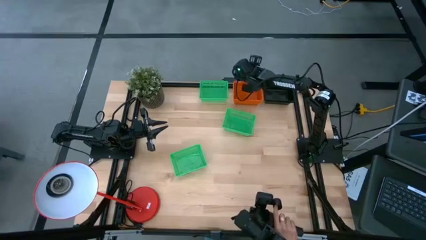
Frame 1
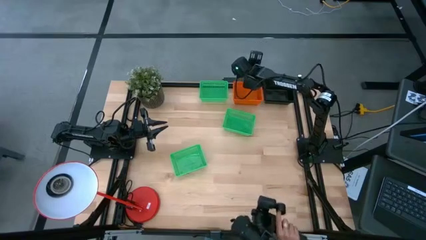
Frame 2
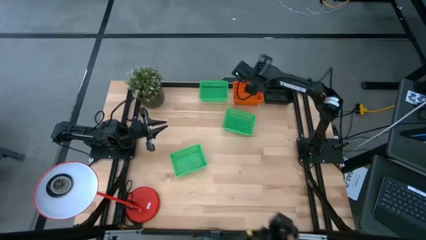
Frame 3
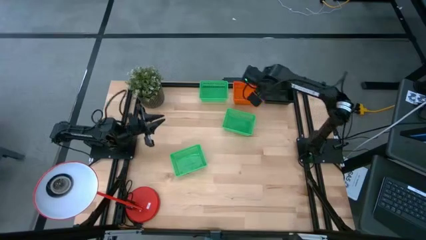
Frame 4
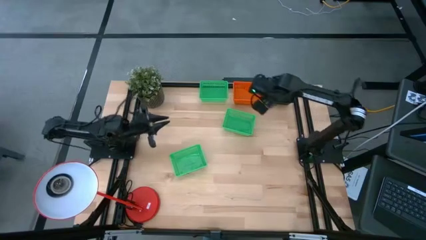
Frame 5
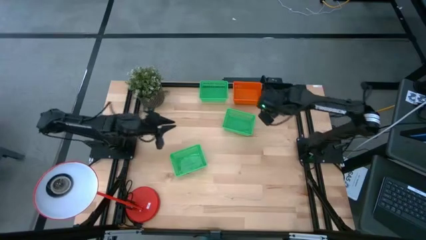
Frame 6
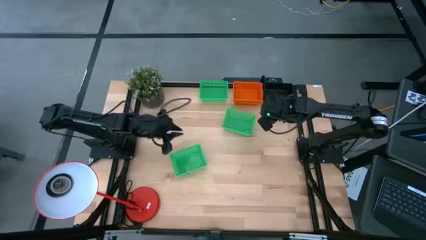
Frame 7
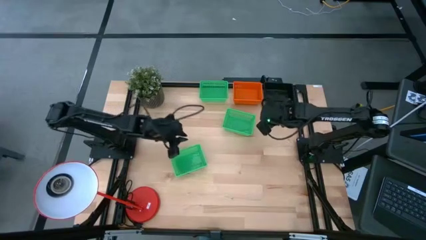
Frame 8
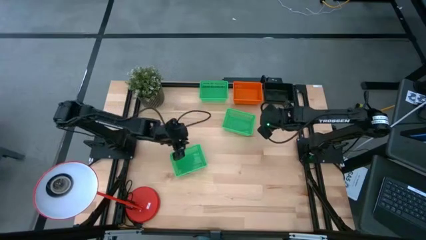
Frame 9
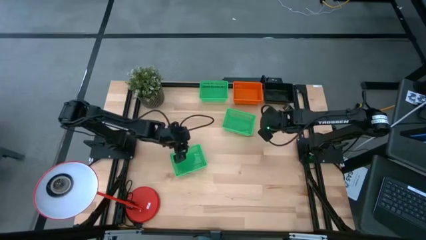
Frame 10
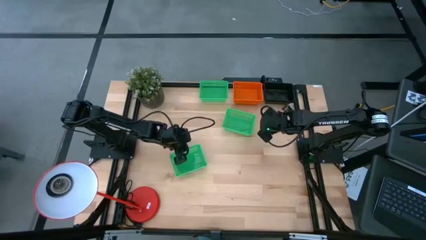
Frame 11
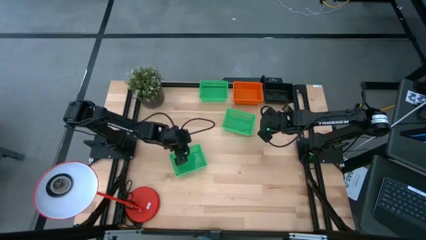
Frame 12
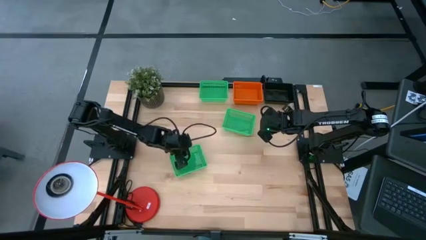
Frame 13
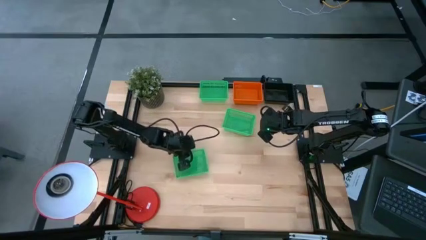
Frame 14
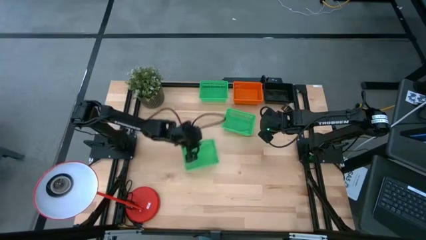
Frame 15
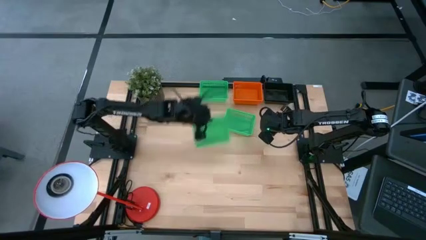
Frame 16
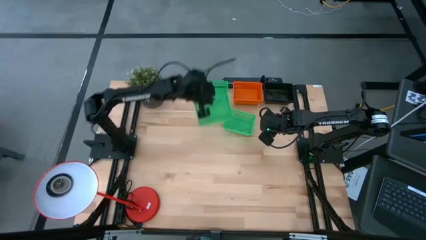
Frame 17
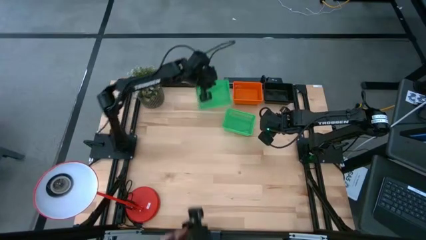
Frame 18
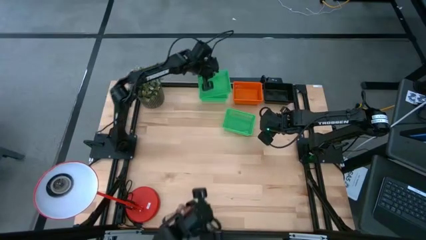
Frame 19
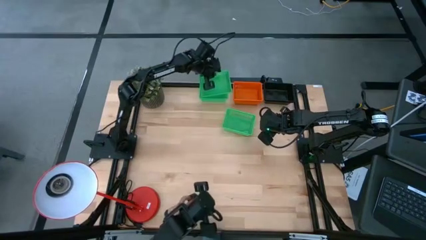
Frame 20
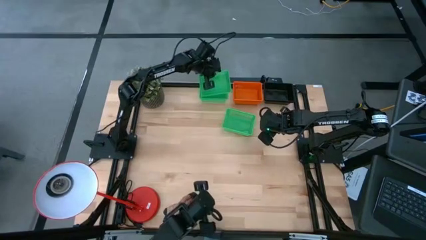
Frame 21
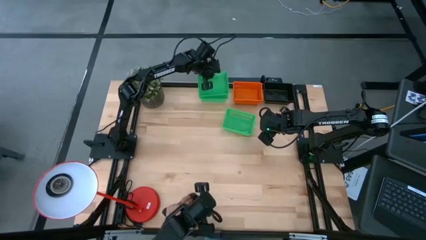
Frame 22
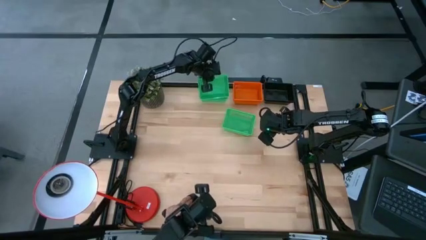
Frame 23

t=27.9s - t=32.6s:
Stack the bottom green bin on top of the top green bin

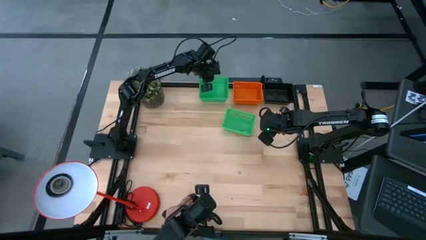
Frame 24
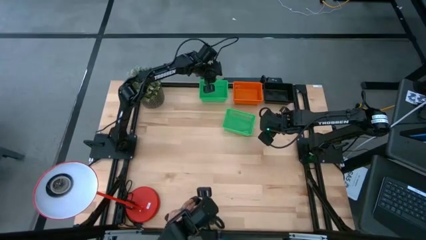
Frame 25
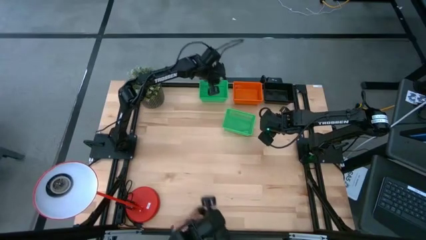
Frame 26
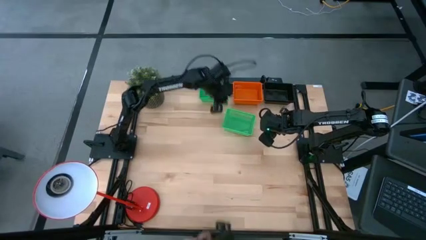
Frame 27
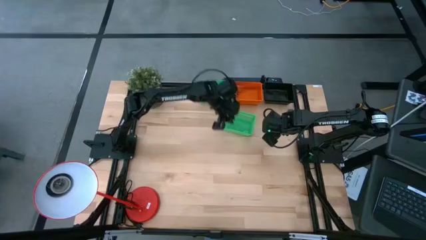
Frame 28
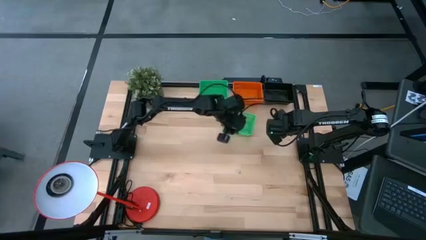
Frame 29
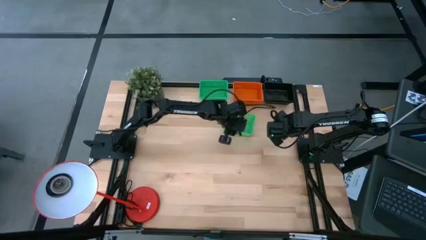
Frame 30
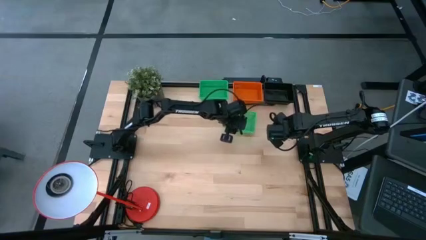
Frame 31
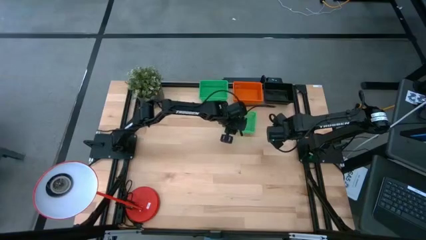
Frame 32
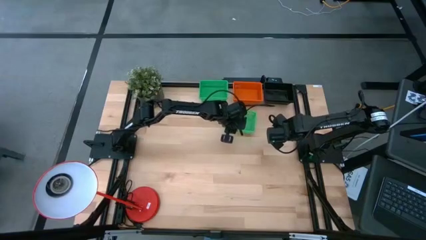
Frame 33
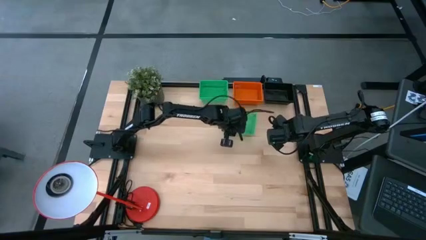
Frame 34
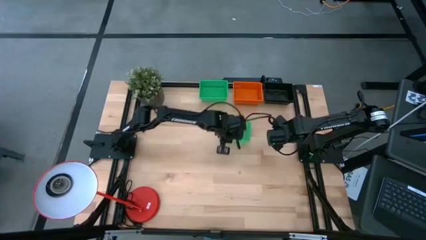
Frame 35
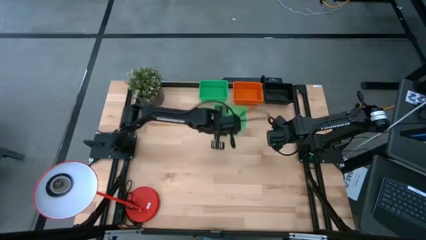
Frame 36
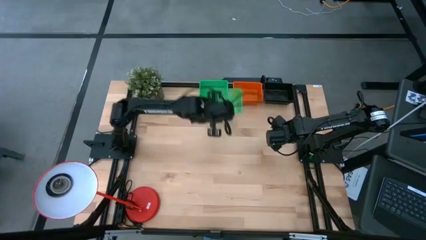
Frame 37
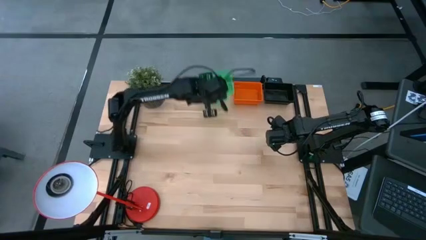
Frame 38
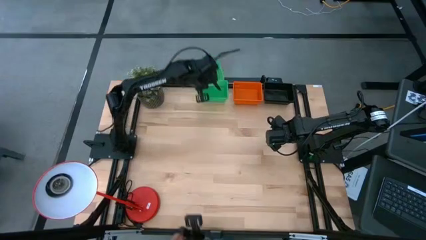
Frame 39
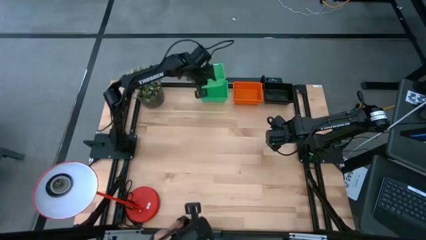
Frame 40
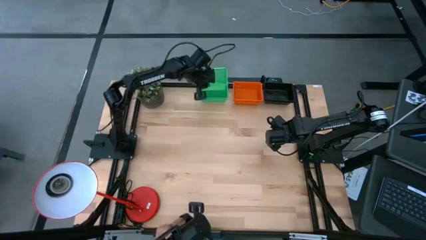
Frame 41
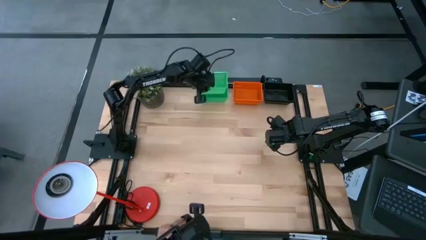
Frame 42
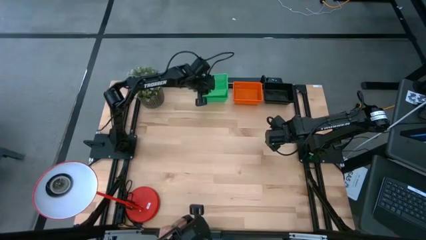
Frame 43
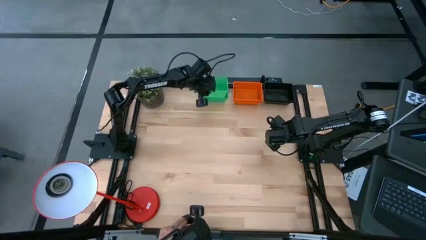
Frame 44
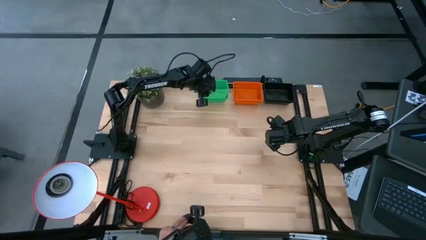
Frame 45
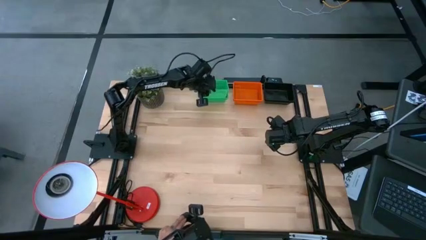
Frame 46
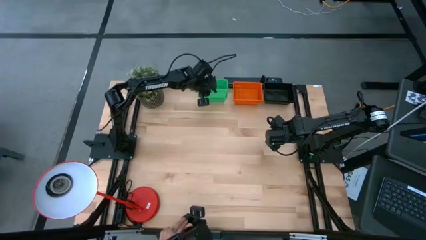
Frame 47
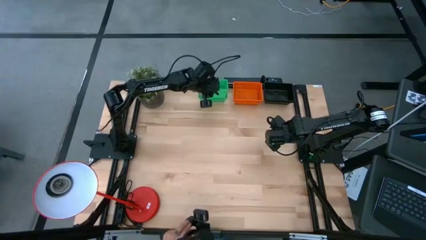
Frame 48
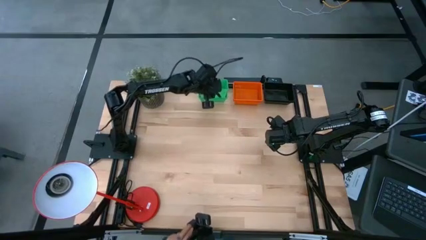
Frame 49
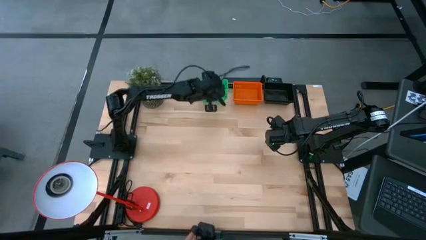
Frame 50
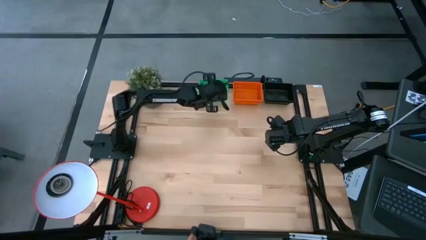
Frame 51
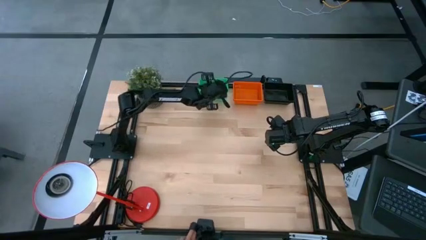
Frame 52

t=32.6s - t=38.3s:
Stack the bottom green bin on top of the top green bins

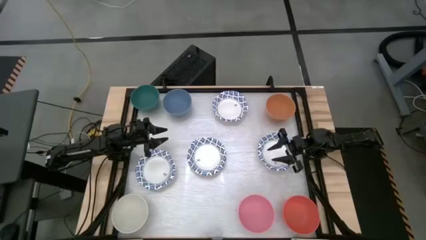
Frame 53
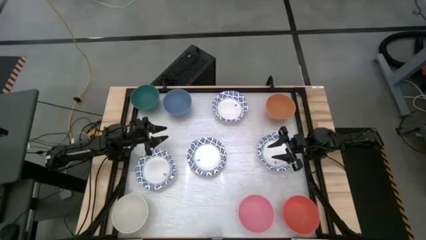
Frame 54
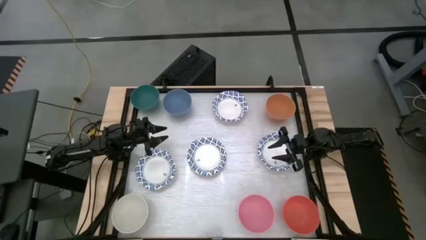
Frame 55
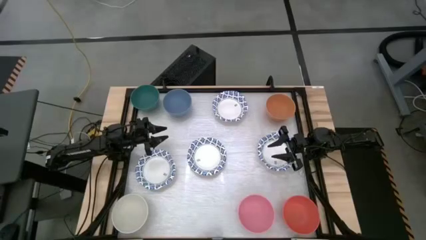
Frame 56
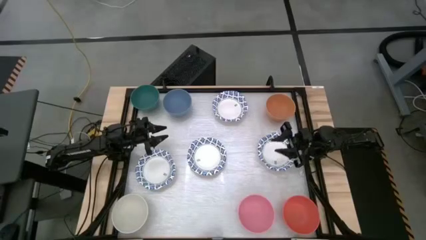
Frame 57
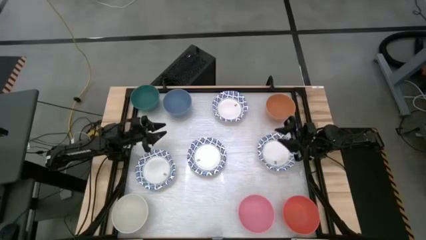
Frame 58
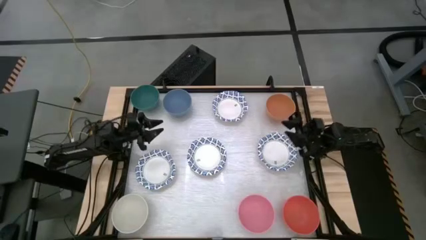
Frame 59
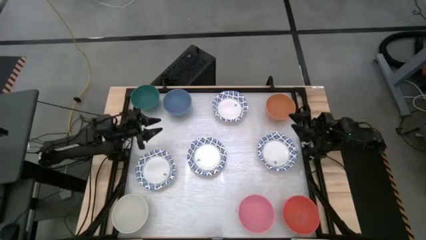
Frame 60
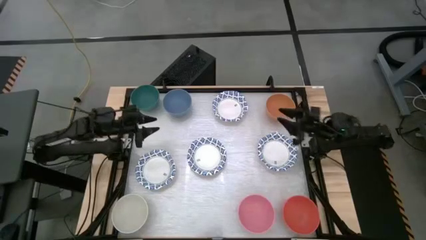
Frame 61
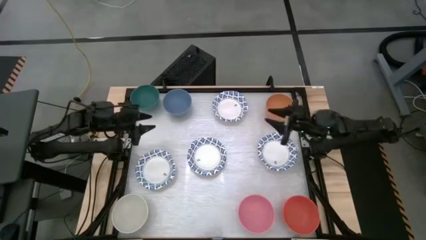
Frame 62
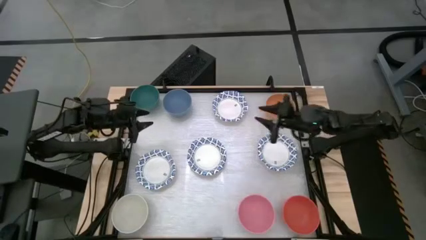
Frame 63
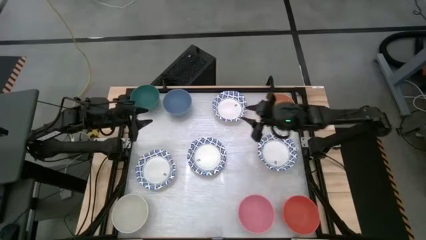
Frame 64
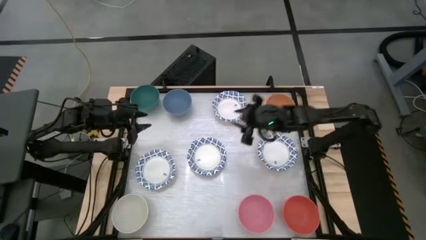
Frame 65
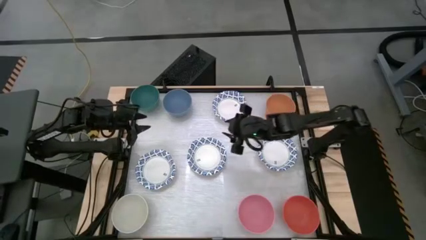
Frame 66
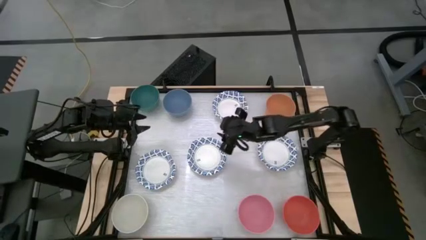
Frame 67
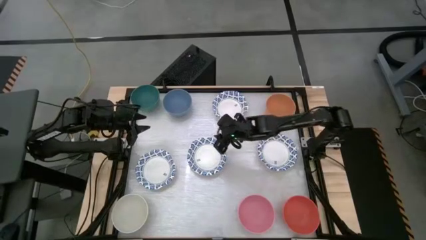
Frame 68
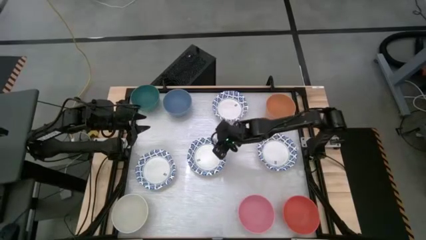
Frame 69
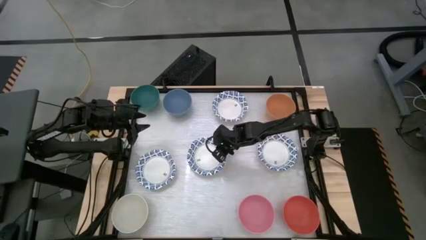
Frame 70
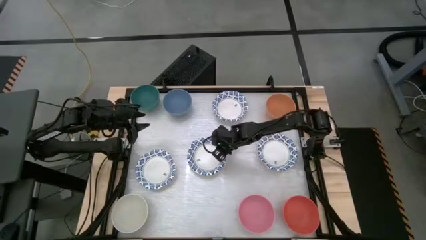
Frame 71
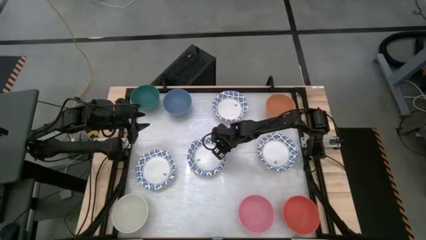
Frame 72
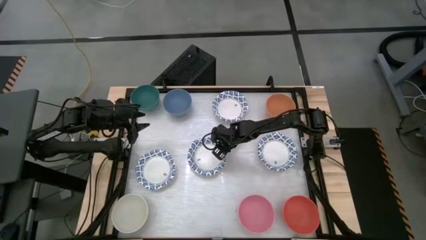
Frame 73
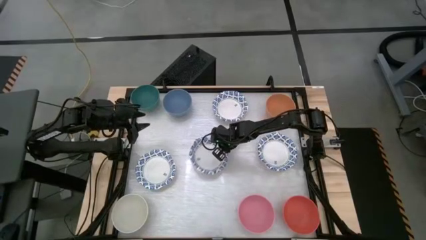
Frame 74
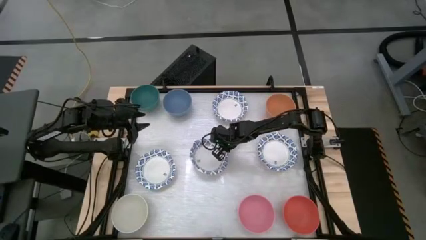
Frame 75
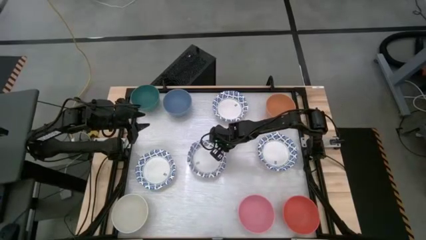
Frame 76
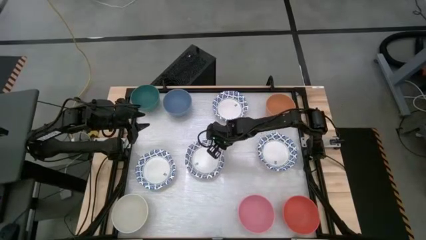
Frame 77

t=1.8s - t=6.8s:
Stack the middle blue pattern bowl on top of the blue pattern bowl

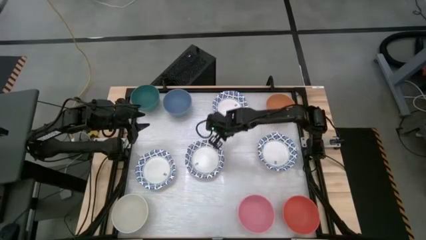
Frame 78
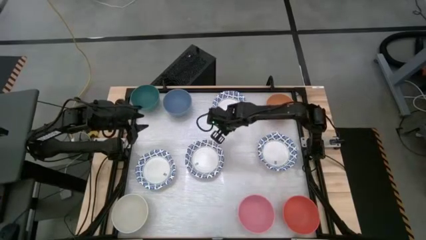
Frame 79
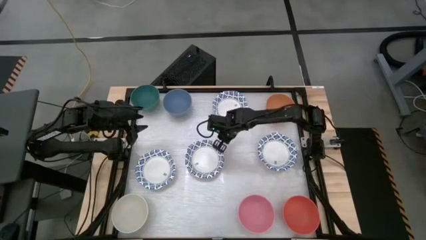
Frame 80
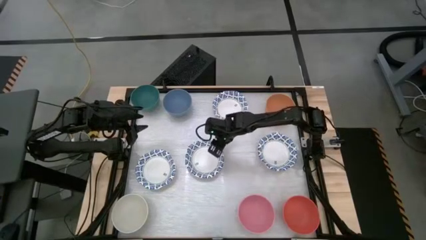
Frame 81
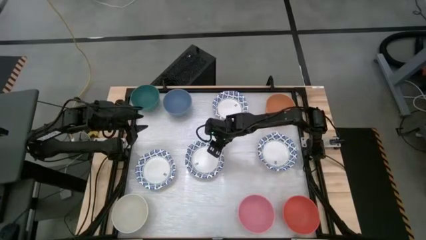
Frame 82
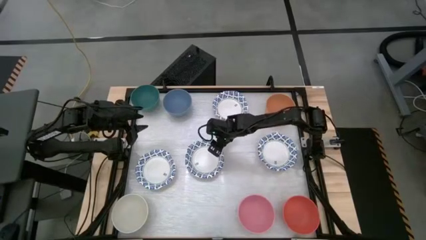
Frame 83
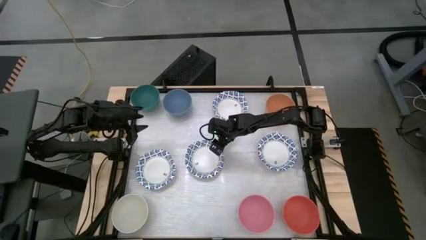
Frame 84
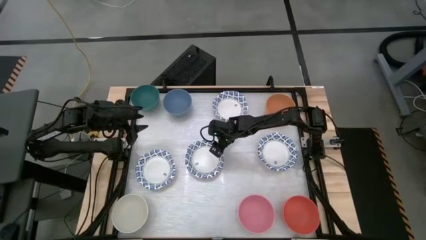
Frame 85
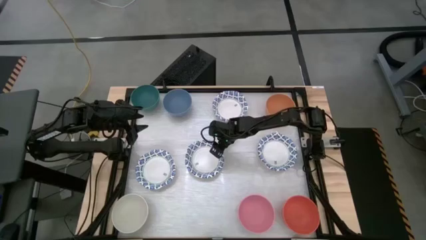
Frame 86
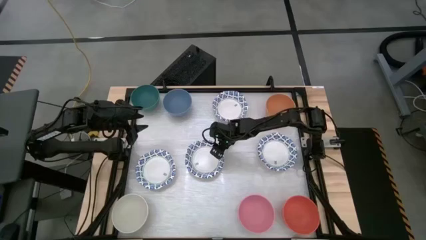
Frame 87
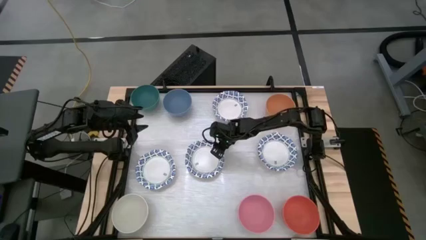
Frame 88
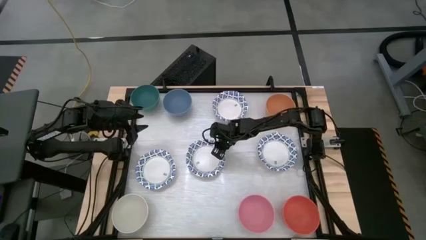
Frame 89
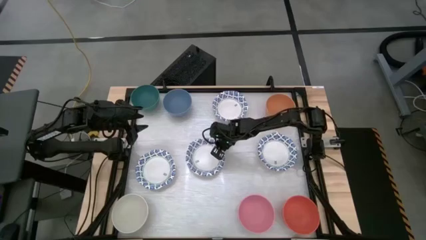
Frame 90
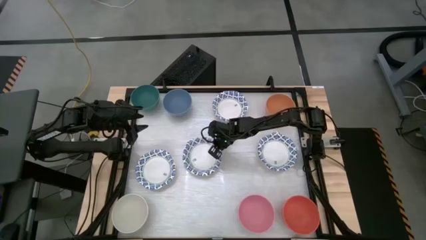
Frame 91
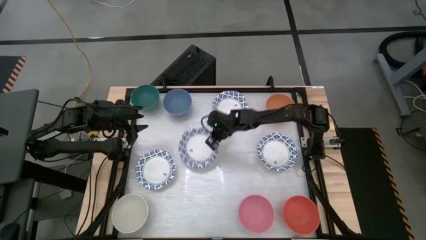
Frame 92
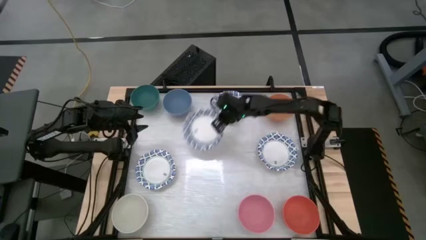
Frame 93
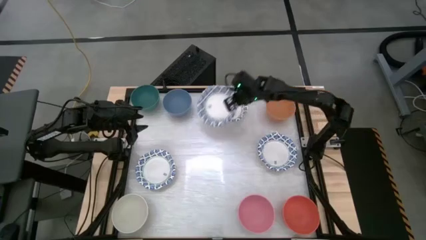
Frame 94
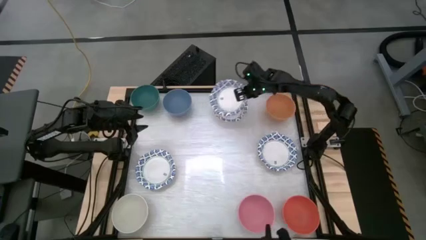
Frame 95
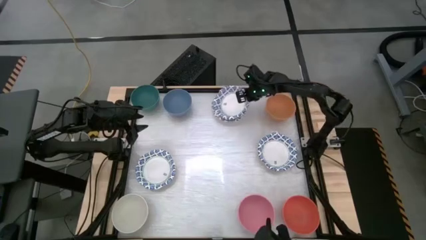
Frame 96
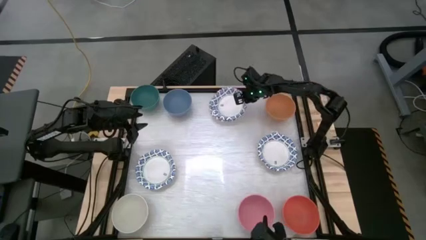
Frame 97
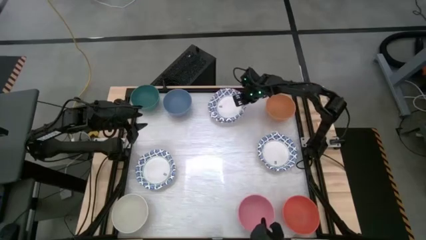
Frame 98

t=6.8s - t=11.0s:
Stack the center blue pattern bowl on top of the blue pattern bowl
